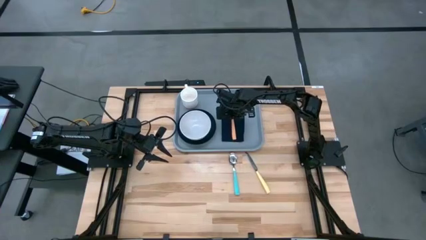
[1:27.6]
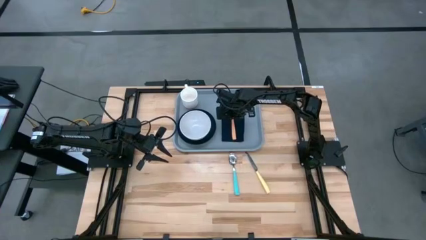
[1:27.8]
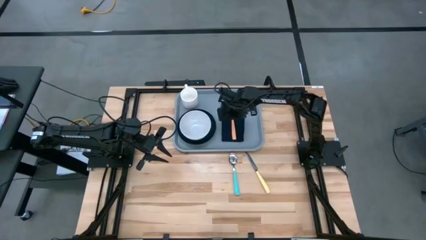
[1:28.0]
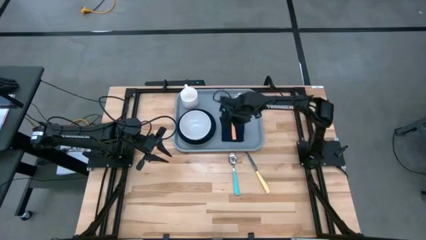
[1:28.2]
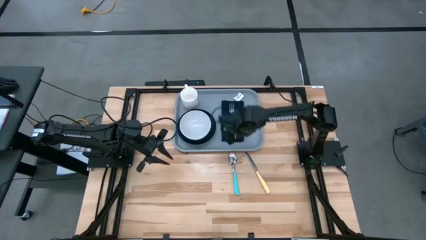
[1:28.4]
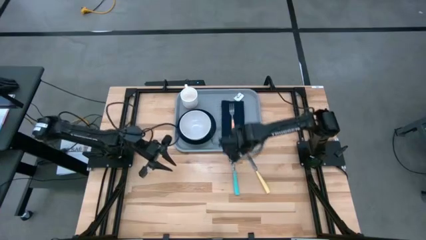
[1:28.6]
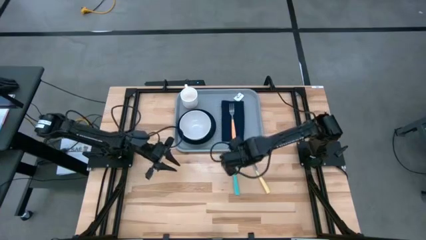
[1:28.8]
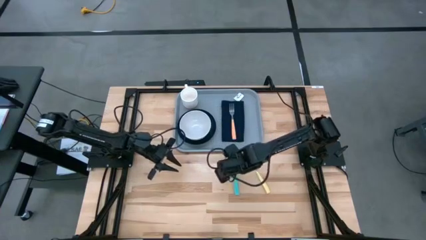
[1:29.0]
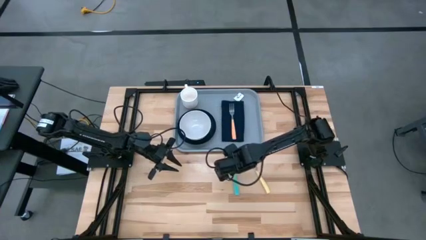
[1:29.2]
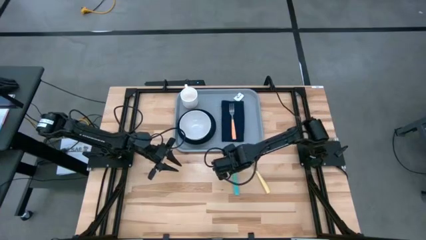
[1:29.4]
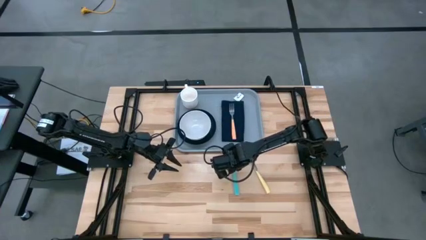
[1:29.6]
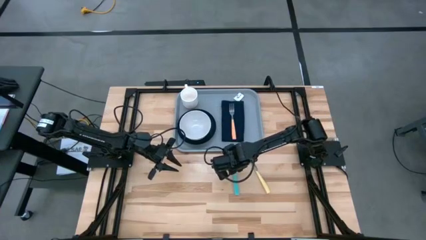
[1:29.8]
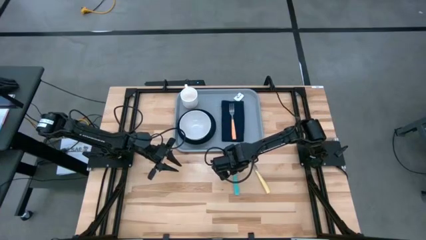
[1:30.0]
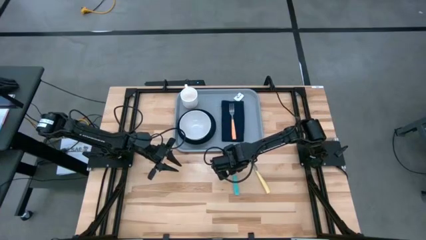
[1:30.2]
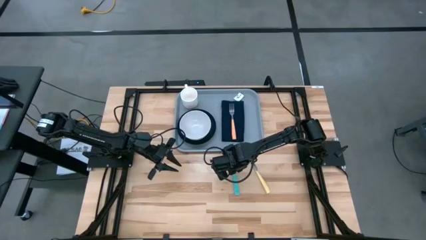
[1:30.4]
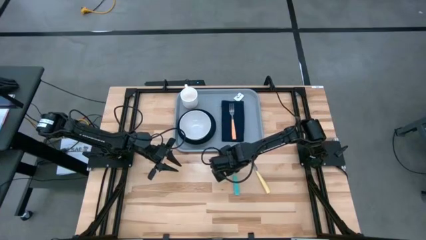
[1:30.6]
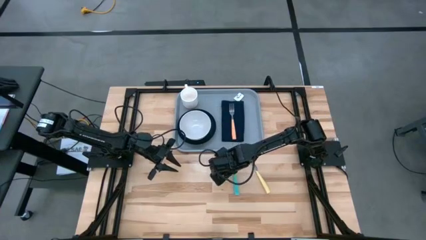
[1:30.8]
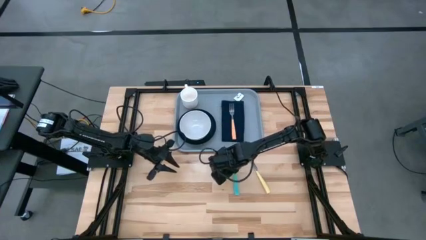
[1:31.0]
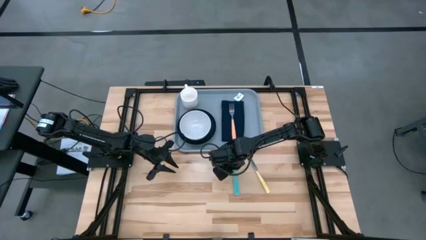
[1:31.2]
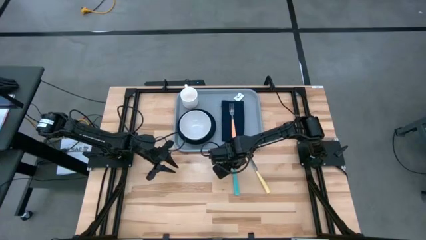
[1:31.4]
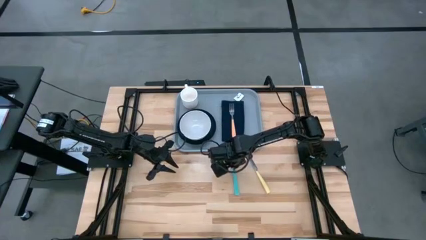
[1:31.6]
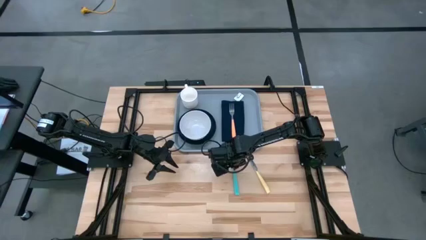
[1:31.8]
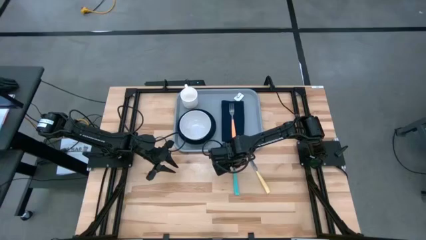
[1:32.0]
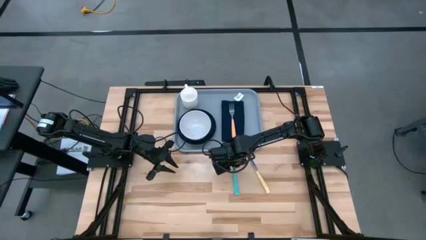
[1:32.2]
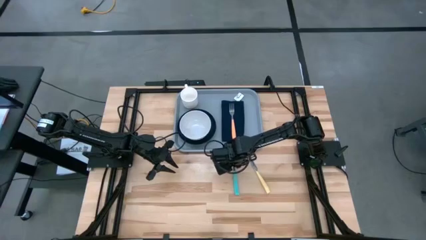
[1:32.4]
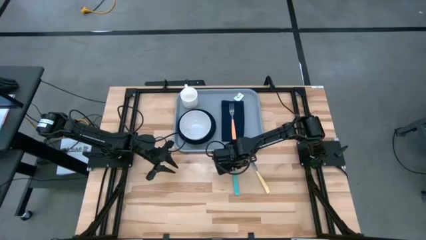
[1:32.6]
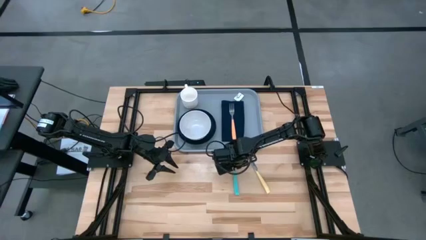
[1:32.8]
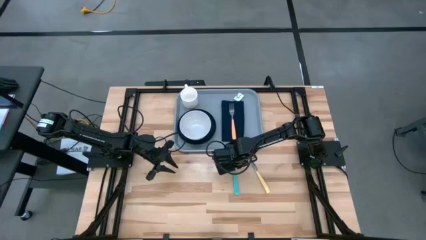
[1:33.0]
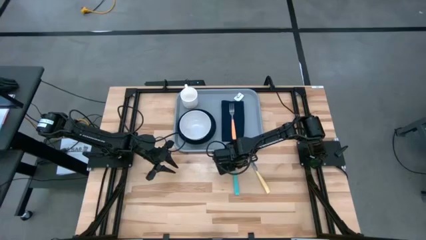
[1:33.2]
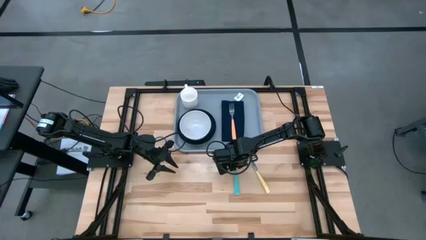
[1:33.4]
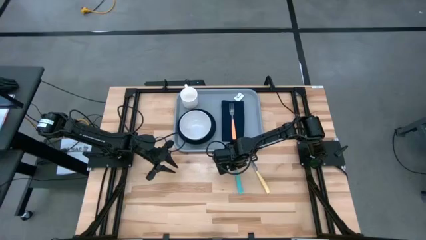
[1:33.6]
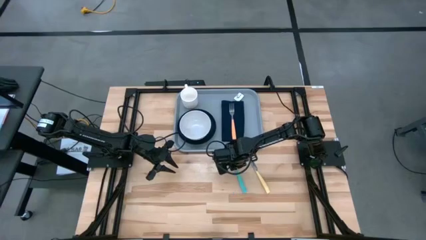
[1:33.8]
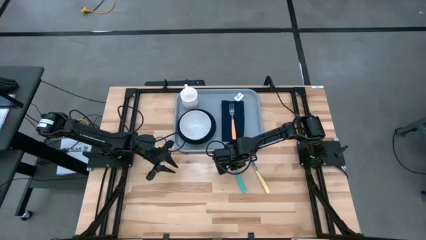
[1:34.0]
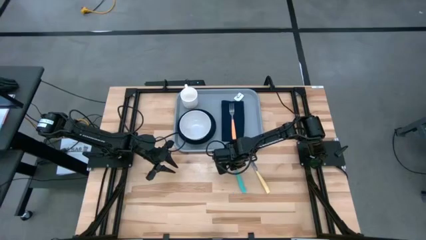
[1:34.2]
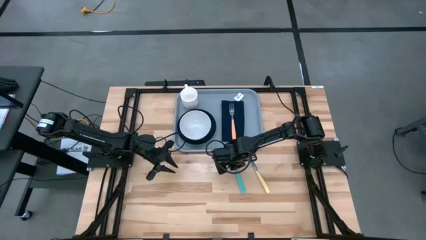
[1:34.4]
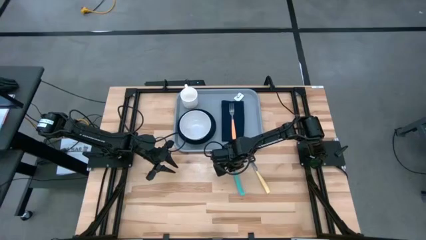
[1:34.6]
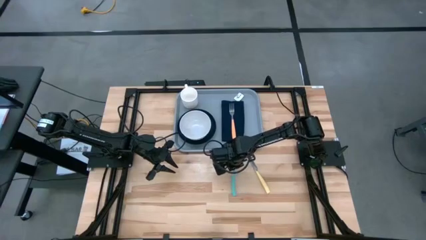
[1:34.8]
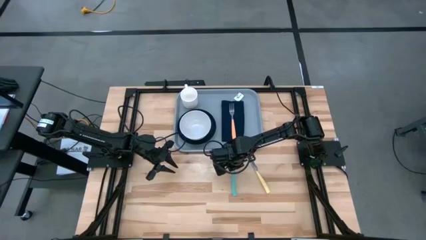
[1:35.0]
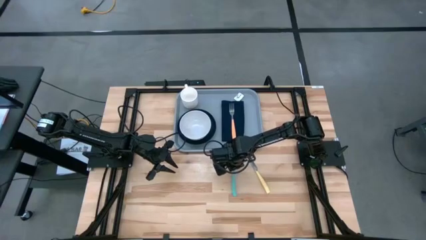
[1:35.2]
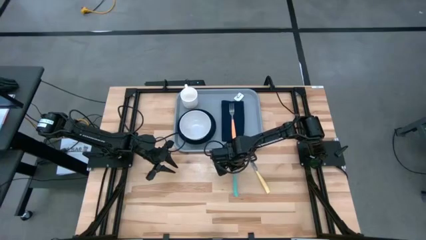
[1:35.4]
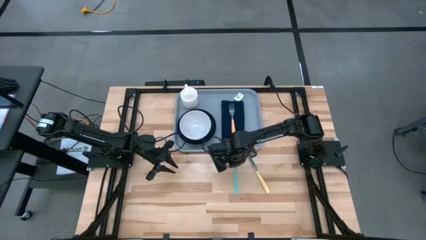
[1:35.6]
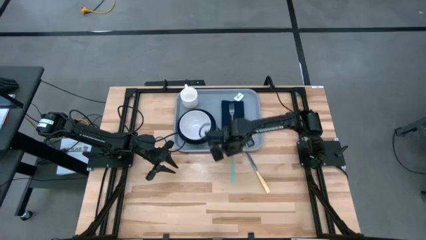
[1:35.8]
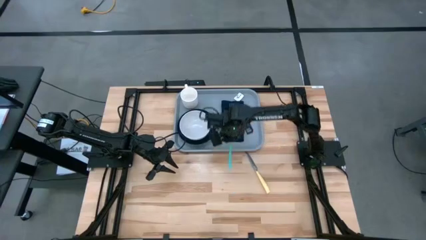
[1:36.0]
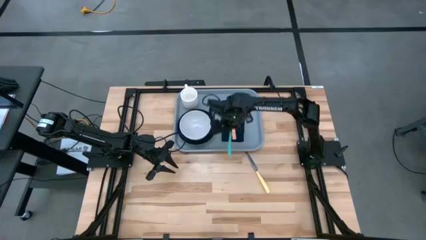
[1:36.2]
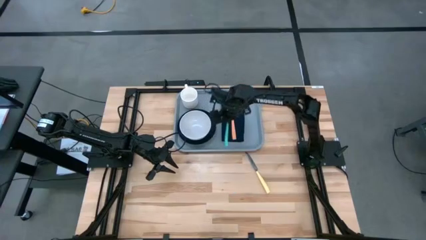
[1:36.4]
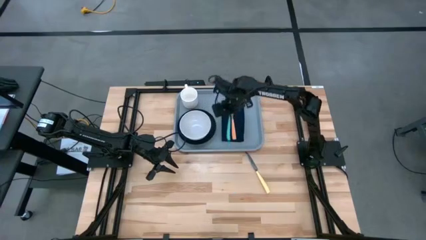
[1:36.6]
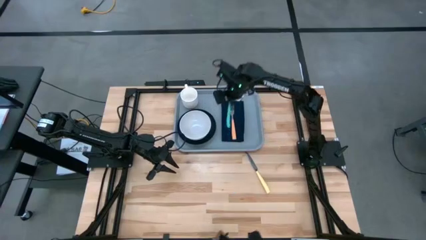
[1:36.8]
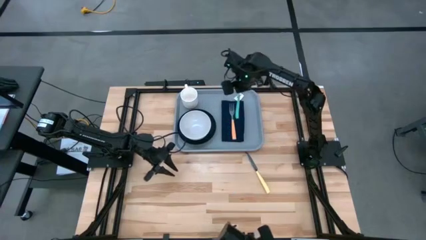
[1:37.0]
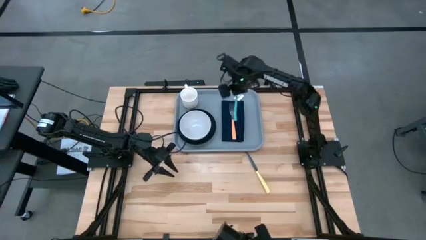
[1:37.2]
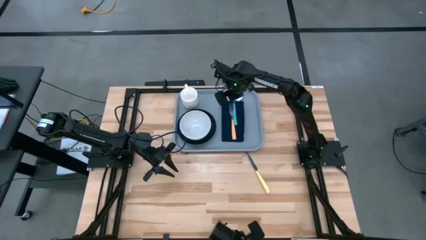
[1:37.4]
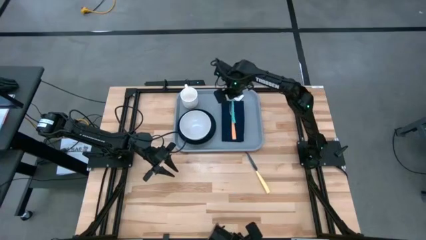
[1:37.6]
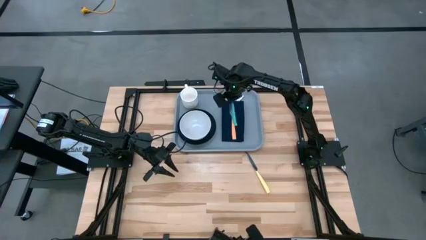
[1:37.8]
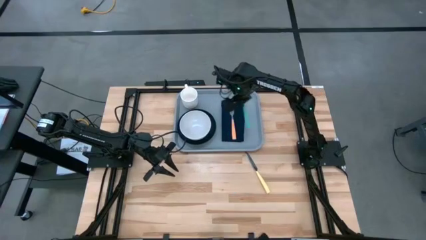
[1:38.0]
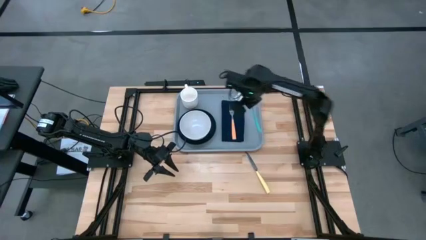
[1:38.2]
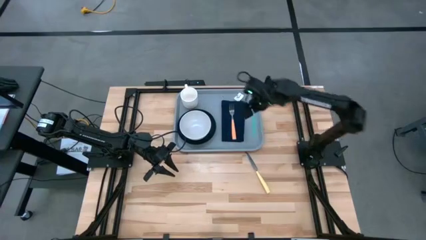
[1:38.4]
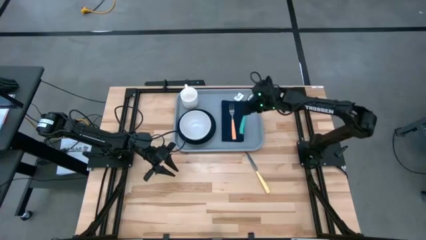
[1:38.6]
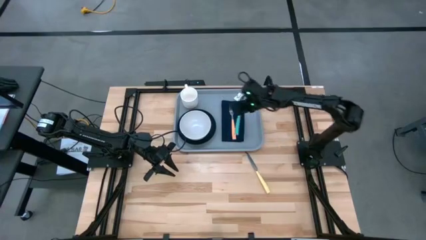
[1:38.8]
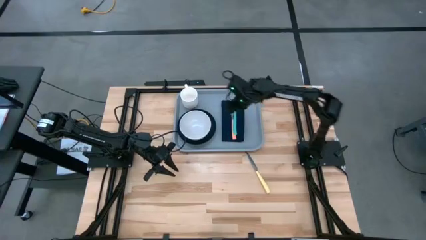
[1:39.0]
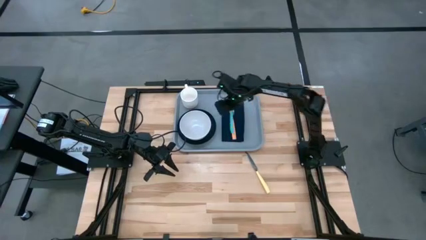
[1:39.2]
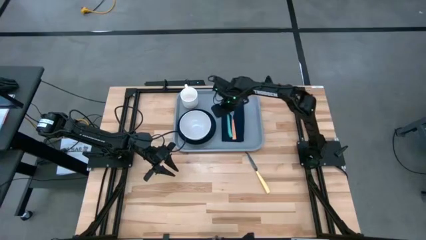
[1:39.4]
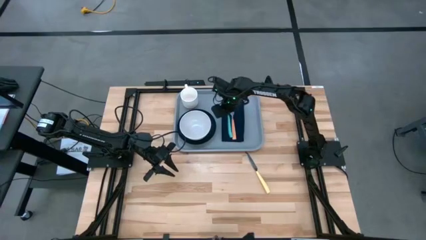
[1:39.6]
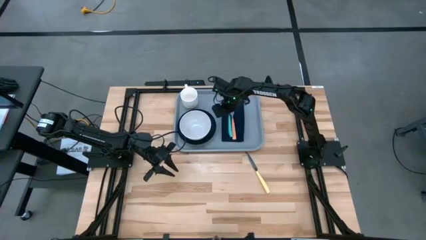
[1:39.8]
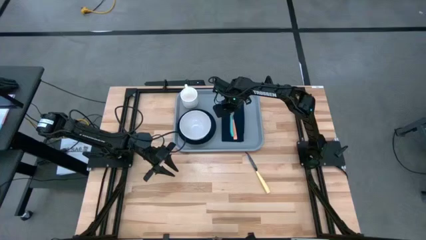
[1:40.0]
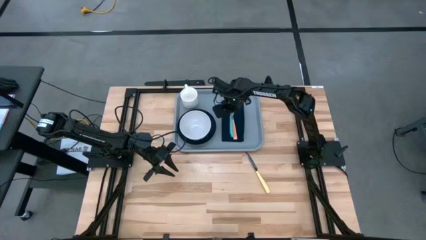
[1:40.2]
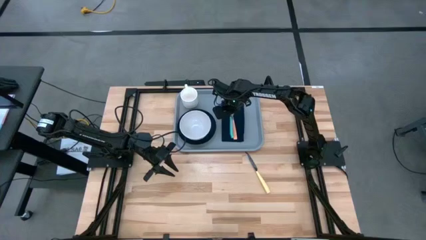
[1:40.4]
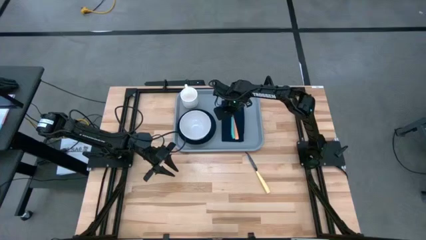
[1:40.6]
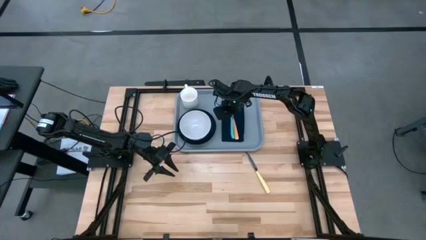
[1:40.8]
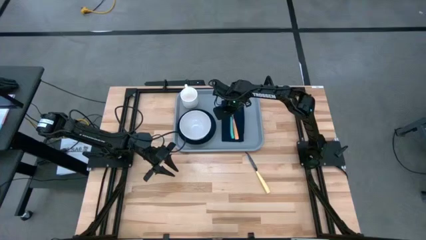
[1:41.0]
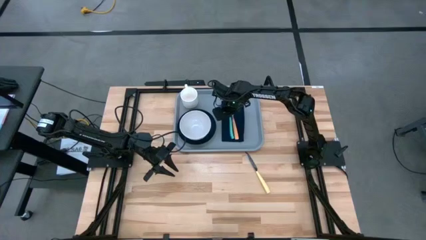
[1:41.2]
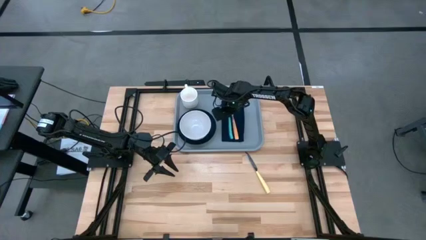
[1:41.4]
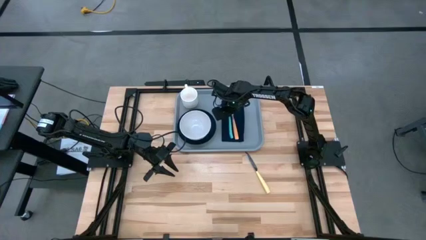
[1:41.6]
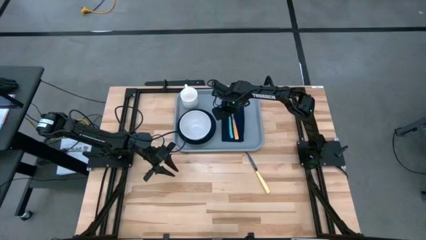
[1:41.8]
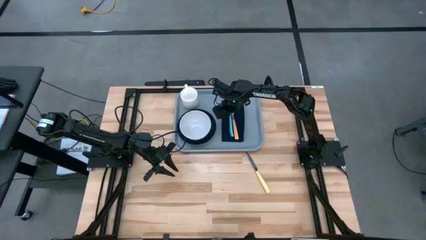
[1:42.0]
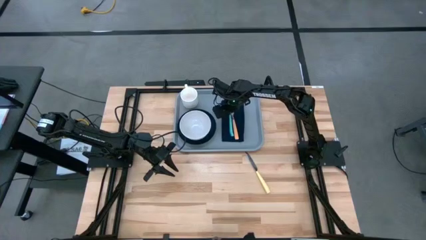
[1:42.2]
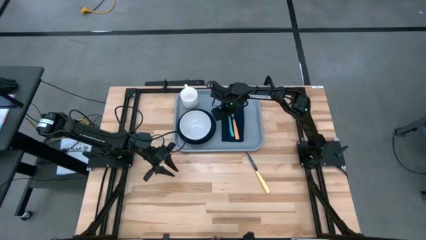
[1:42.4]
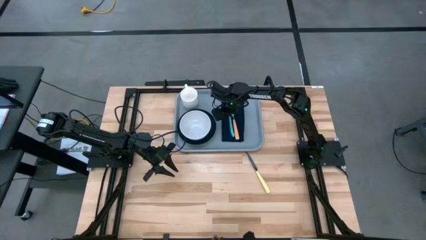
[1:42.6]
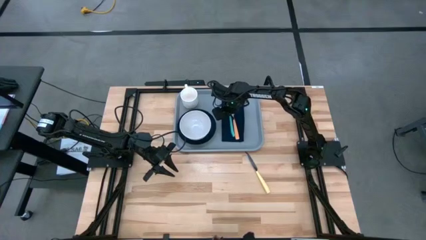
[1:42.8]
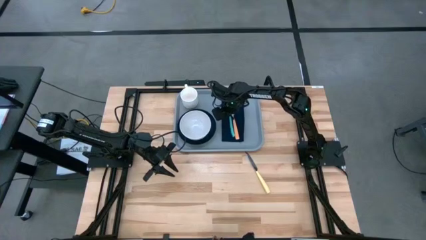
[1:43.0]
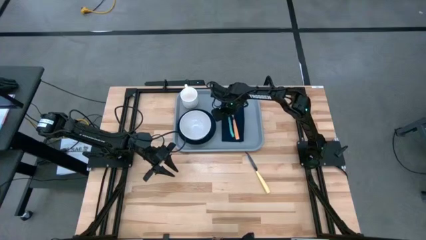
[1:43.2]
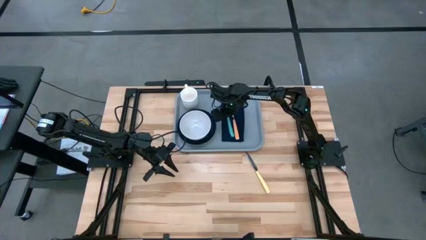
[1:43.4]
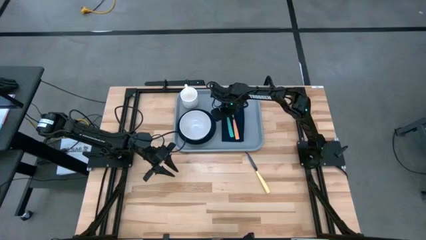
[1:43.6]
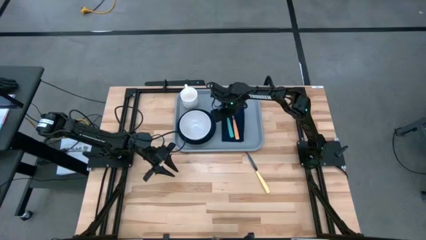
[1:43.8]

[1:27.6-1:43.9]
Task: Set up tray
Put the blue spoon to the left of the orange fork on the blue table napkin
